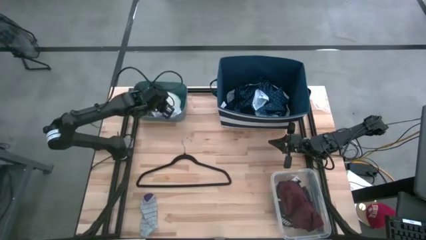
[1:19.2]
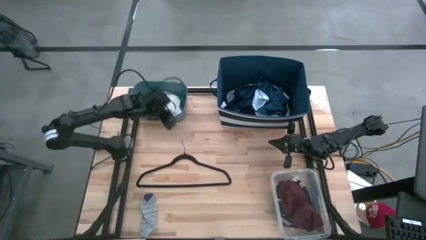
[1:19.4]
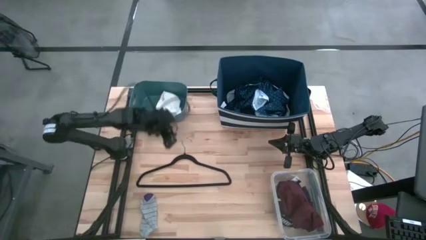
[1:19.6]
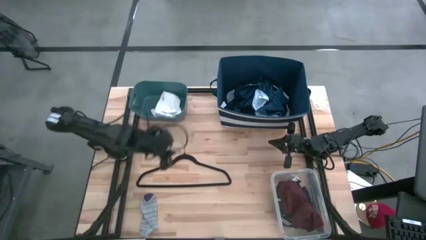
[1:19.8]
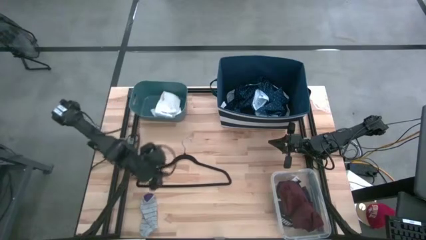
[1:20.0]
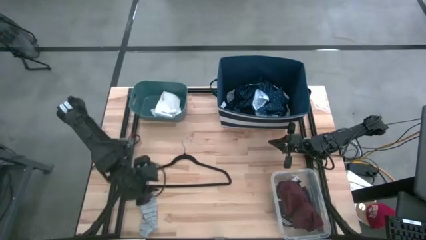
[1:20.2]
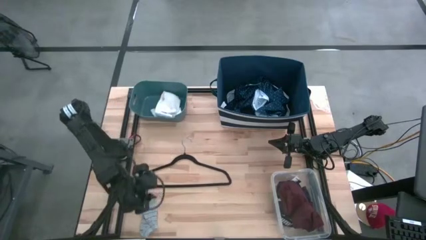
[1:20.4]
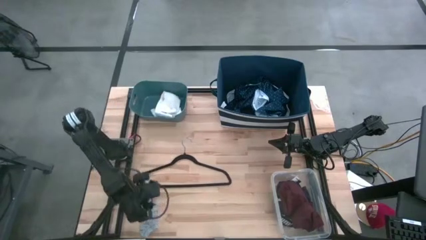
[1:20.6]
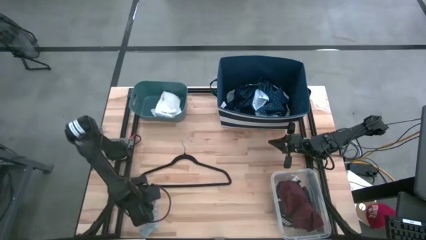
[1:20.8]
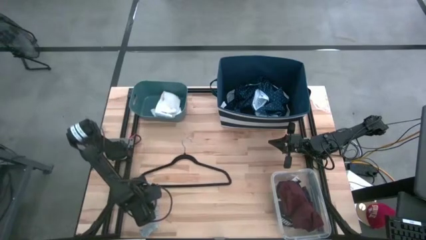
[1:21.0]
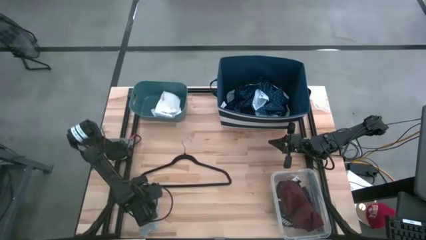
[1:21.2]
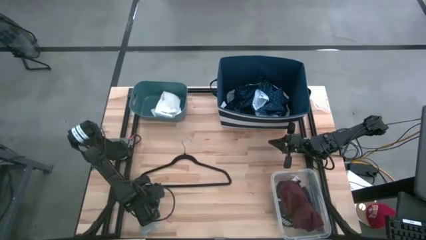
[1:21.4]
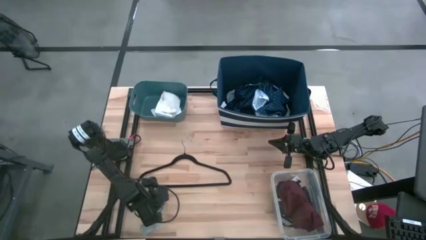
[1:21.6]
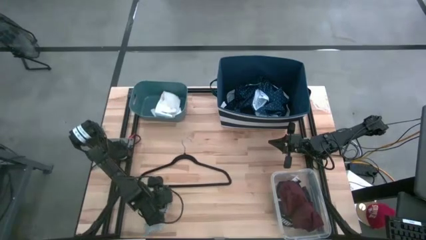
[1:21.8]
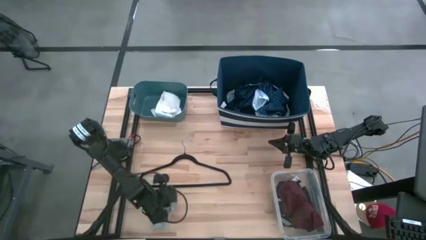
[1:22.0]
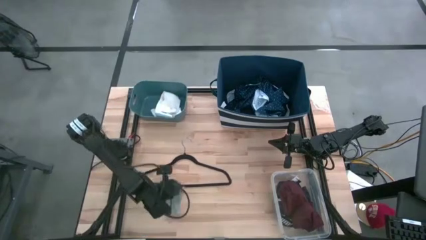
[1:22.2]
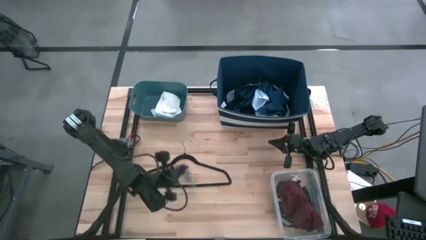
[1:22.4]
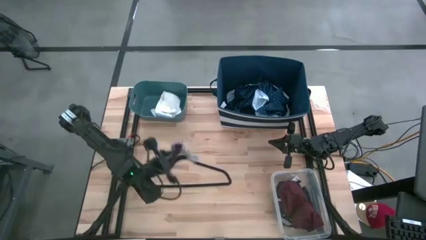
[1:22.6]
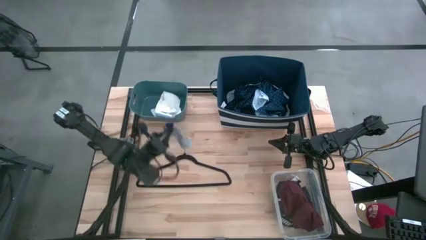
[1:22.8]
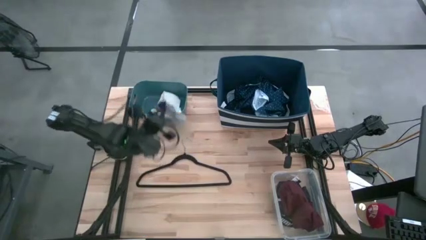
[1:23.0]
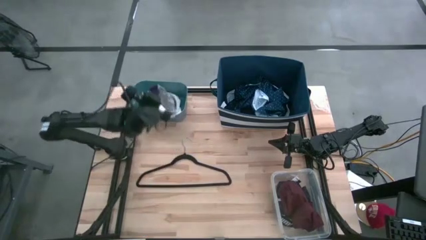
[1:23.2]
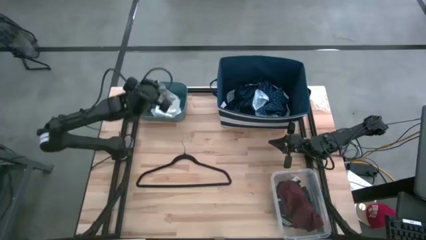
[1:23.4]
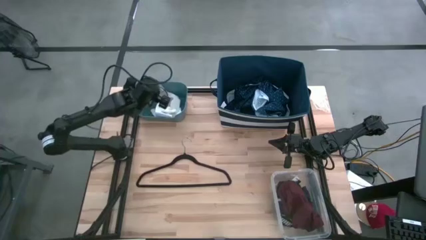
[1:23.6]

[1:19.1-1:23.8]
Task: Pick & Place Cloths
Put the gray sock into the light blue bin

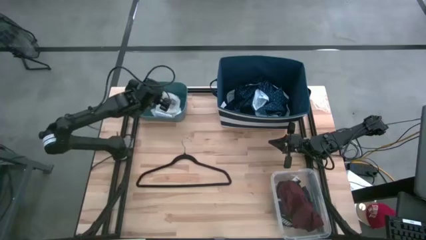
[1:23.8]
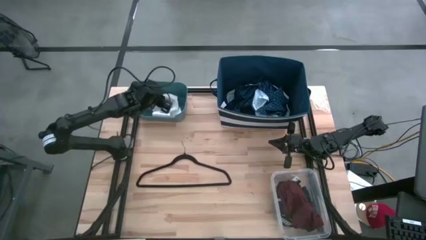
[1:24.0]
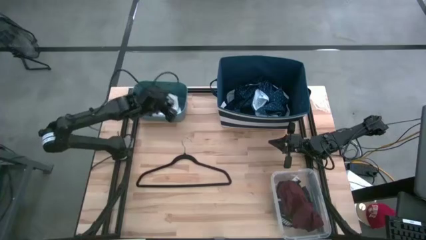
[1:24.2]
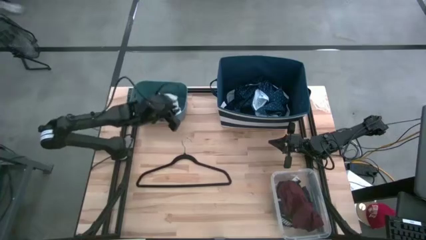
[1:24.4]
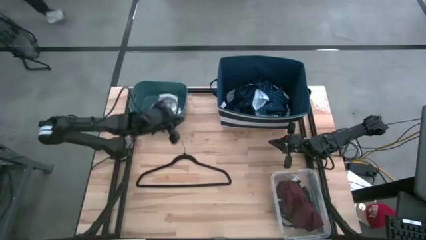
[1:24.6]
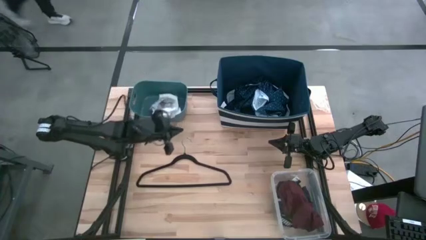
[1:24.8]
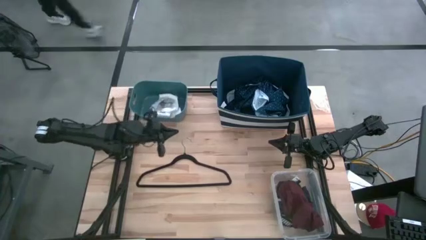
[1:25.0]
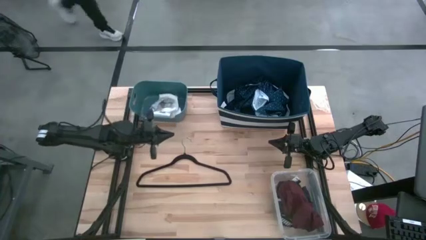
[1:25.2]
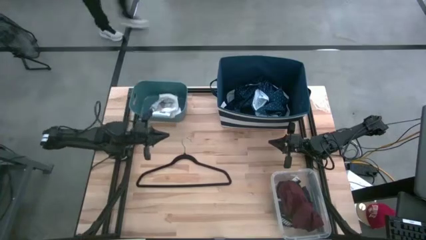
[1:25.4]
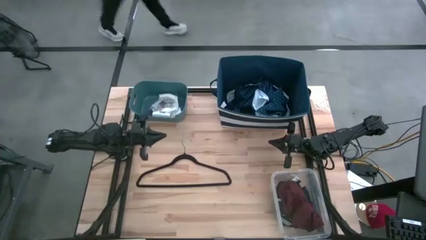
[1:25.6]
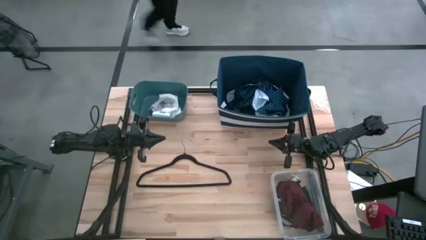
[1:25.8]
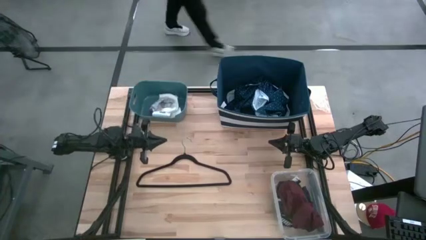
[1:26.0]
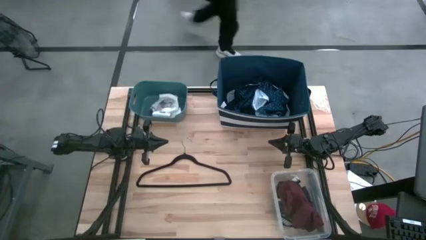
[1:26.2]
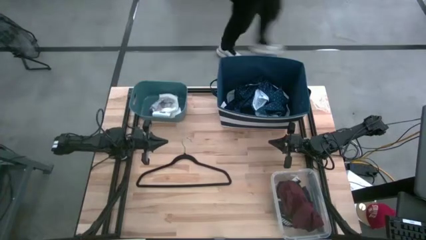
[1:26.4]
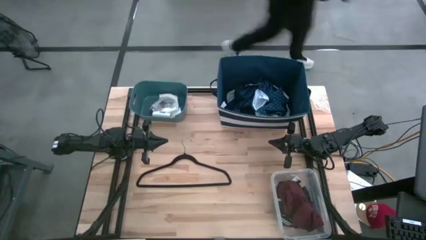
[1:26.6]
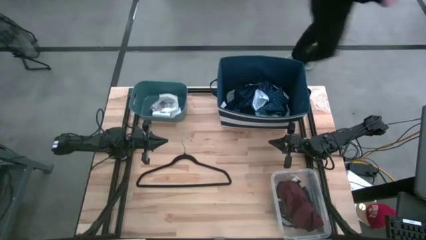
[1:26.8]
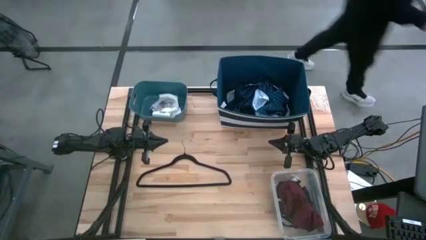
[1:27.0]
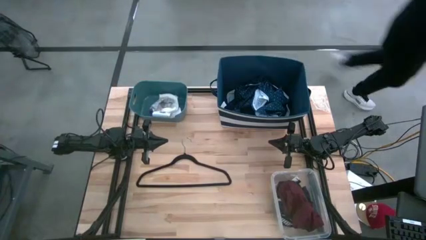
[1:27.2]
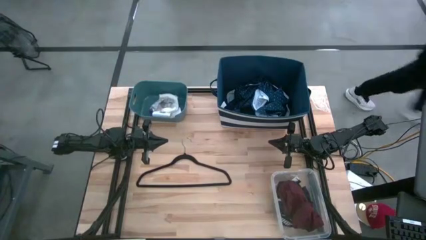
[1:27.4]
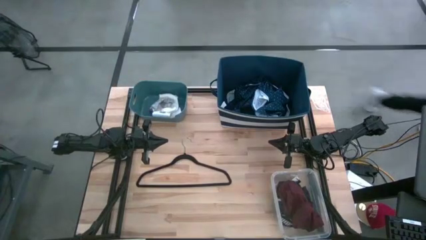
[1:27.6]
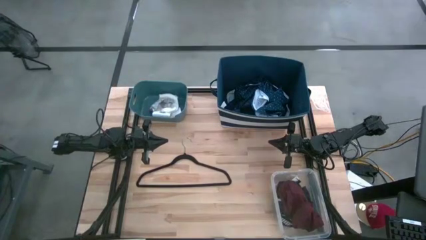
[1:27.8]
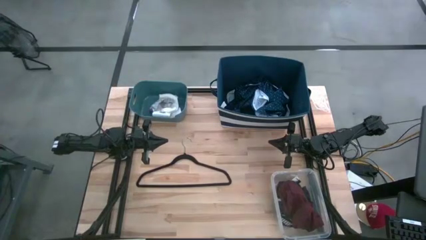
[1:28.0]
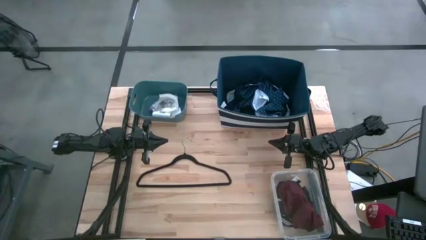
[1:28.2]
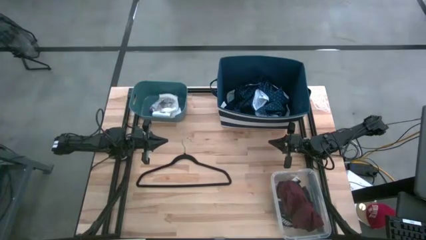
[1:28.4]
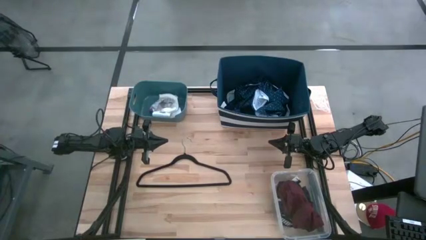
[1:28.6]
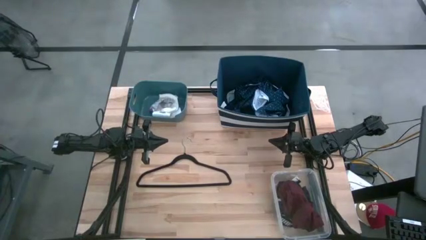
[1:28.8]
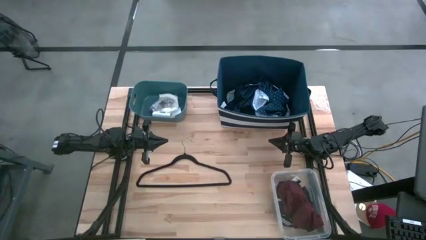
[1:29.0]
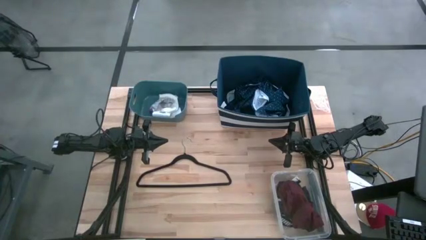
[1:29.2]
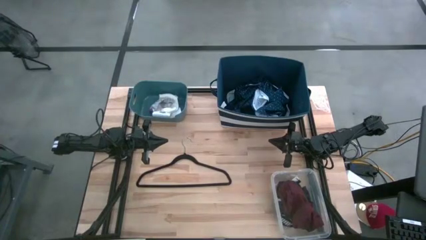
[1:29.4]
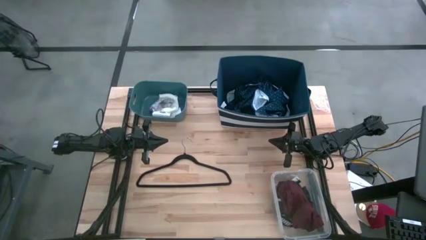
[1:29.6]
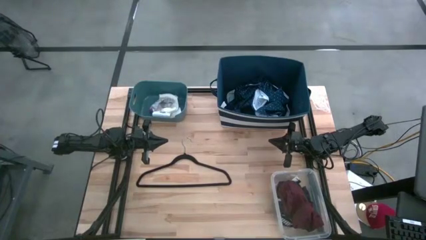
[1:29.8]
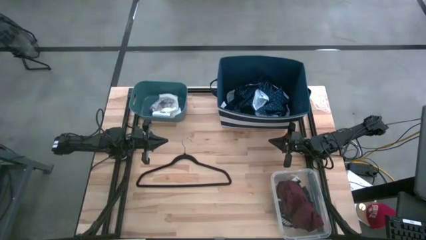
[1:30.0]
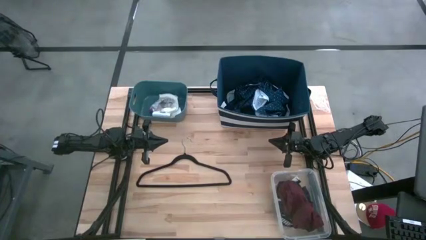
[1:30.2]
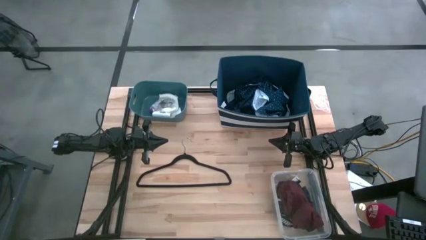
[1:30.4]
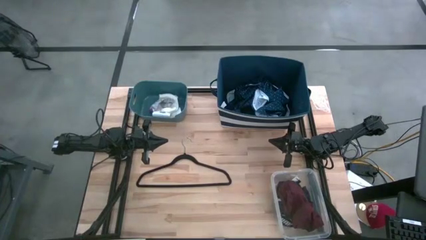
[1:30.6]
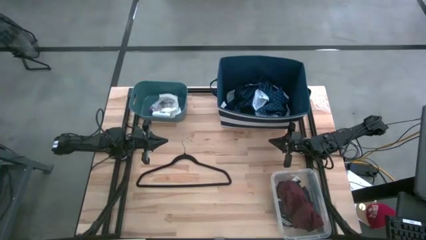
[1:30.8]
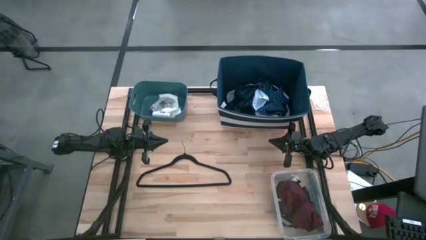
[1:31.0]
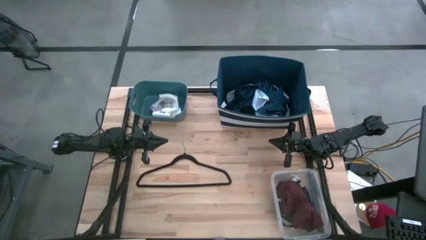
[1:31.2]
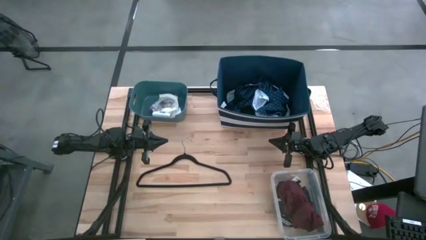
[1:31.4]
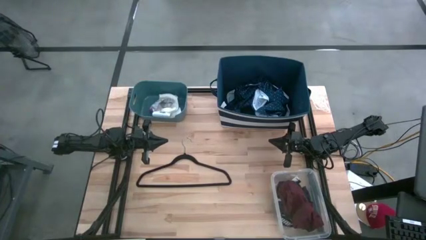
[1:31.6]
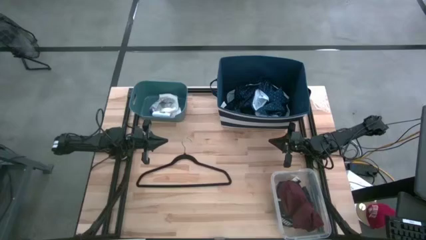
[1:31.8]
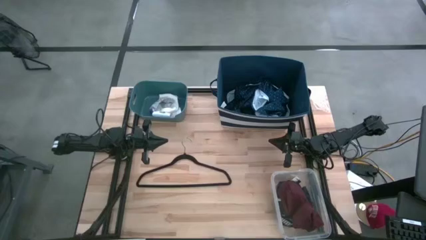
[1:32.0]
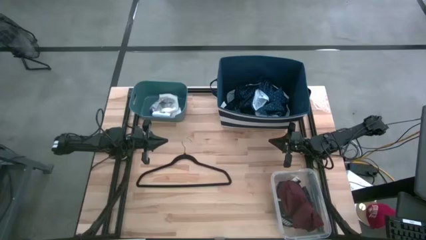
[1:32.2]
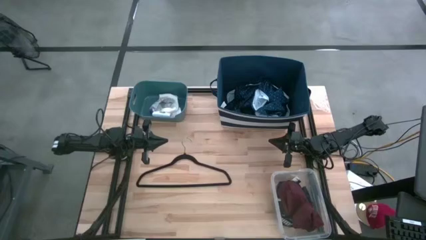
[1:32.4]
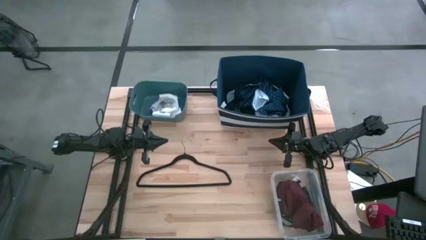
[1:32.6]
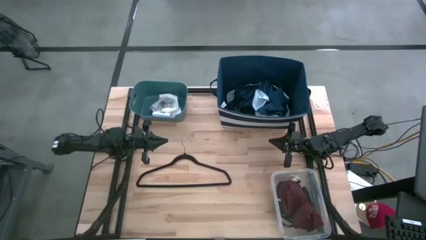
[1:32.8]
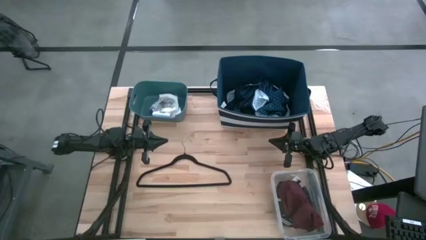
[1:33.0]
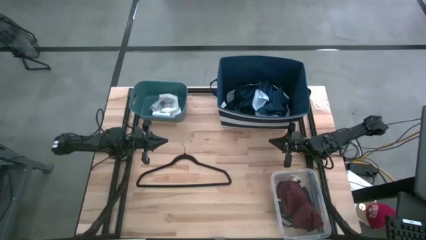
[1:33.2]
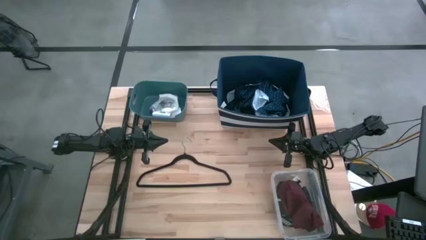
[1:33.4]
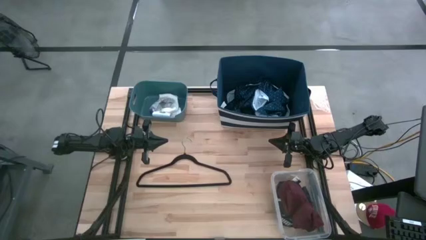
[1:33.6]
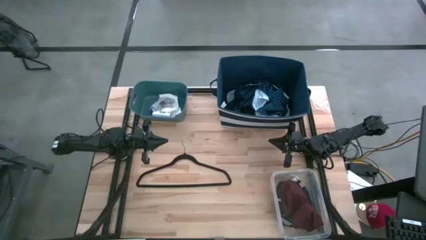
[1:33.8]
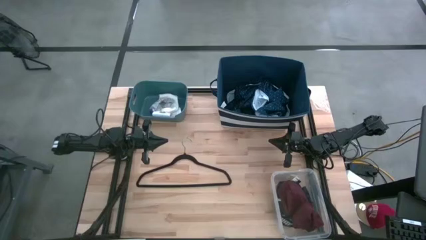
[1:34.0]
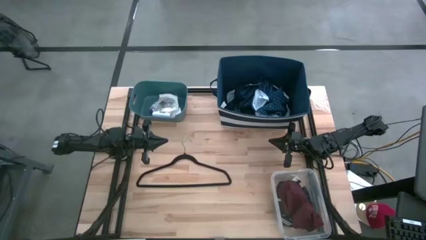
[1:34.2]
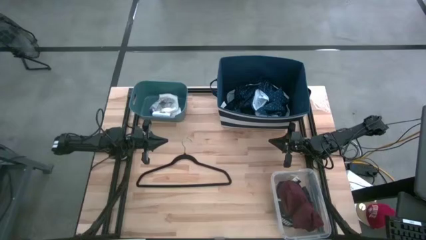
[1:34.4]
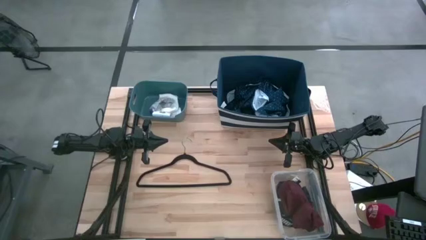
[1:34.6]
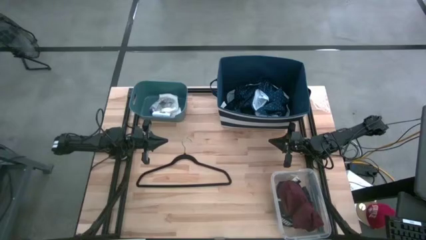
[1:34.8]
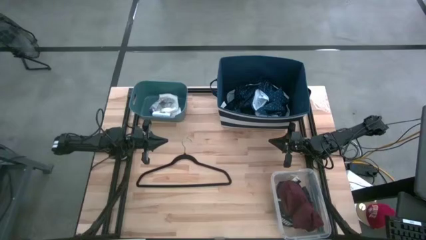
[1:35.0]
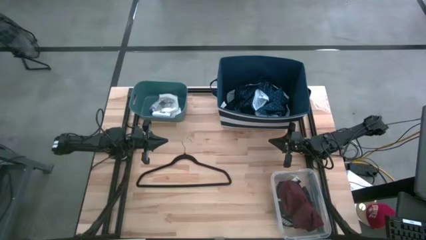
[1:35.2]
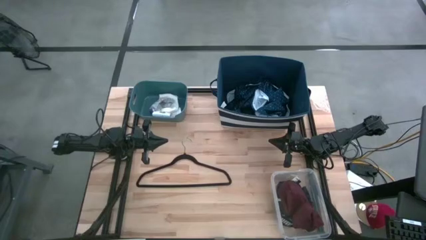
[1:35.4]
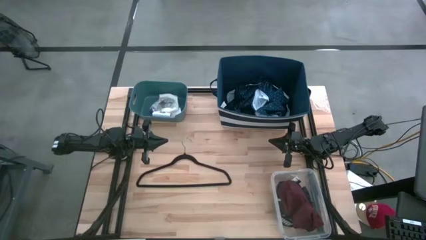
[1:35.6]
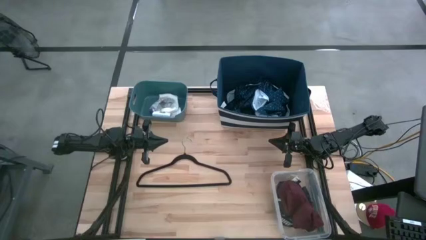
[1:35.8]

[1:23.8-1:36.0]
Return to Home Position
